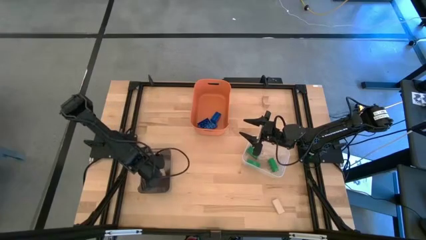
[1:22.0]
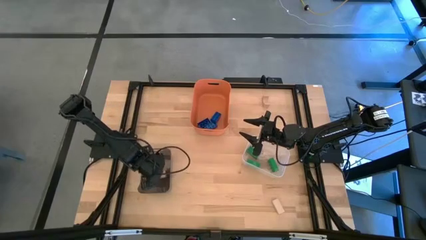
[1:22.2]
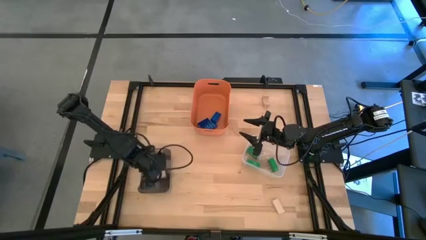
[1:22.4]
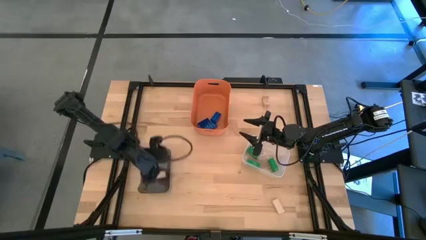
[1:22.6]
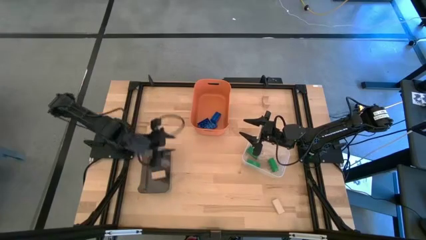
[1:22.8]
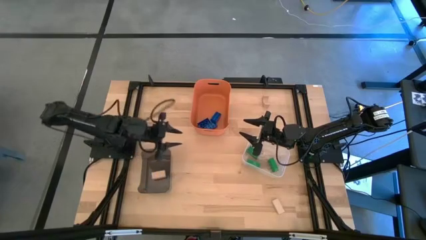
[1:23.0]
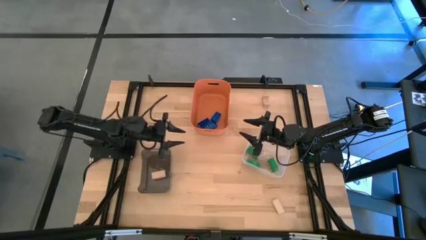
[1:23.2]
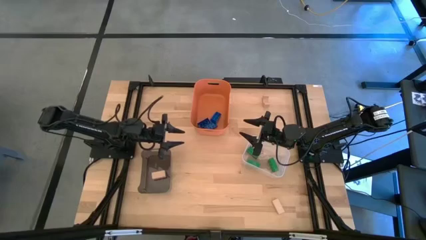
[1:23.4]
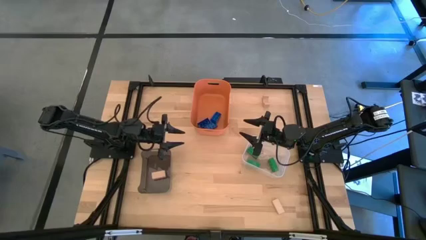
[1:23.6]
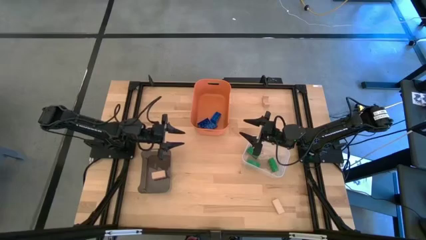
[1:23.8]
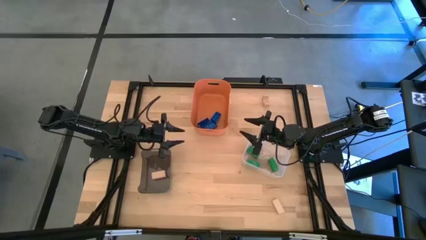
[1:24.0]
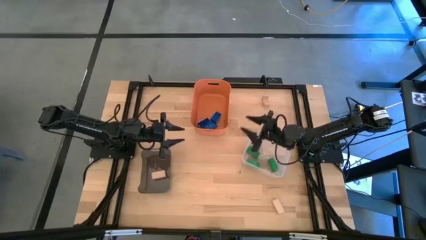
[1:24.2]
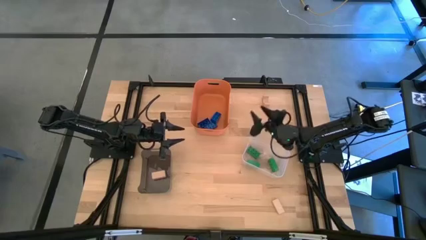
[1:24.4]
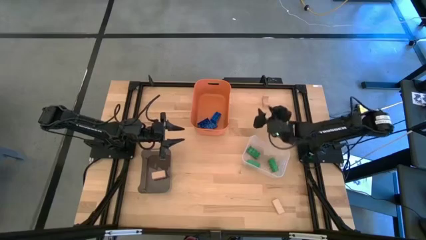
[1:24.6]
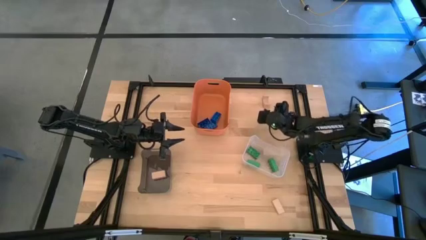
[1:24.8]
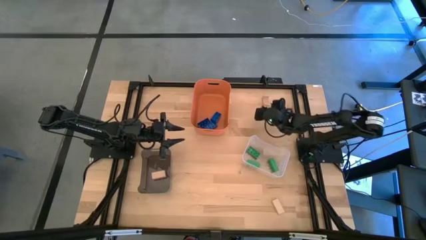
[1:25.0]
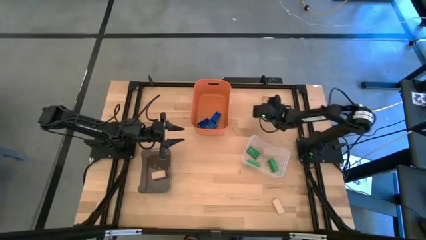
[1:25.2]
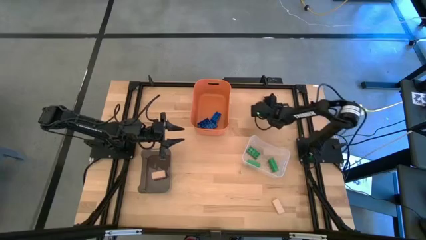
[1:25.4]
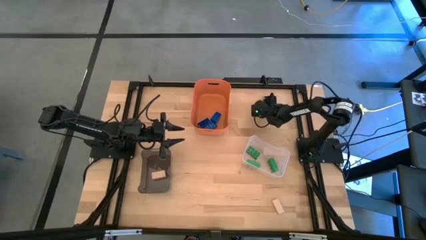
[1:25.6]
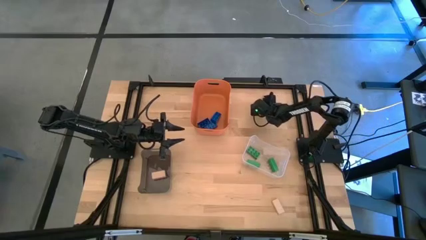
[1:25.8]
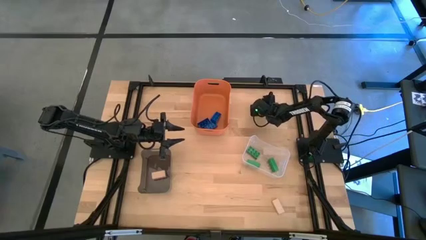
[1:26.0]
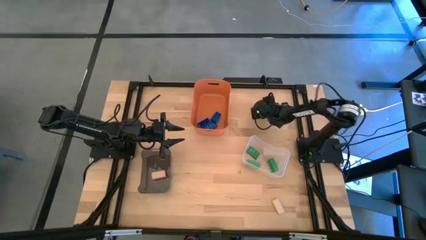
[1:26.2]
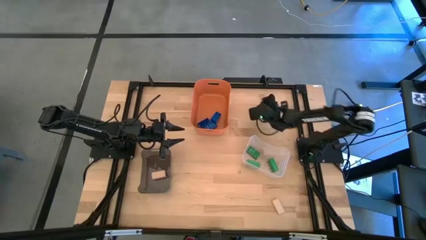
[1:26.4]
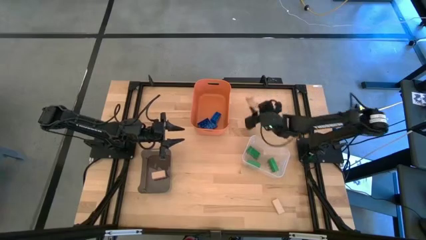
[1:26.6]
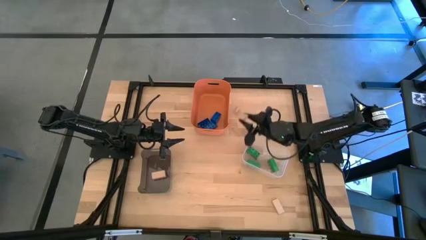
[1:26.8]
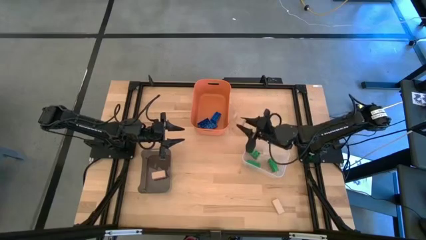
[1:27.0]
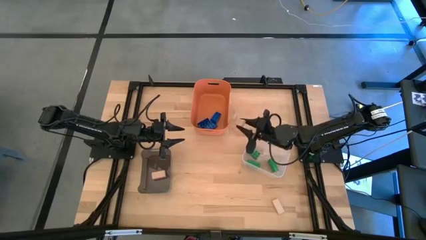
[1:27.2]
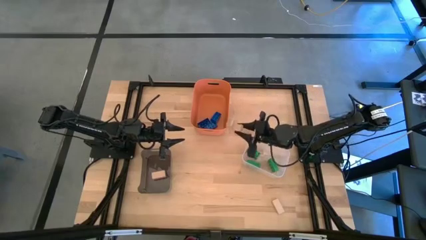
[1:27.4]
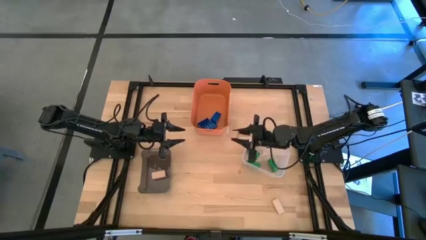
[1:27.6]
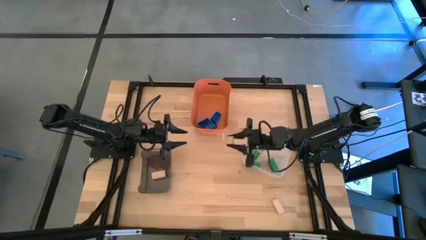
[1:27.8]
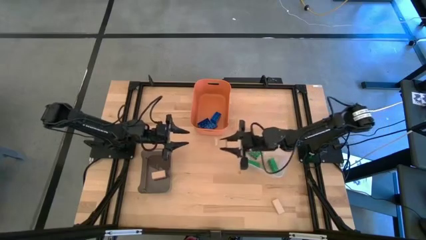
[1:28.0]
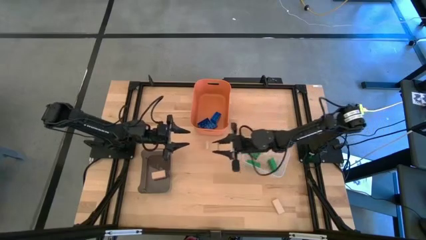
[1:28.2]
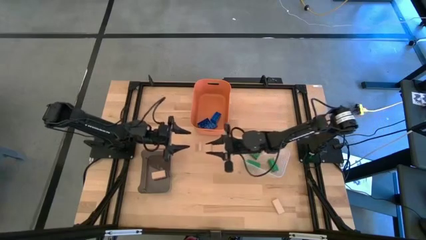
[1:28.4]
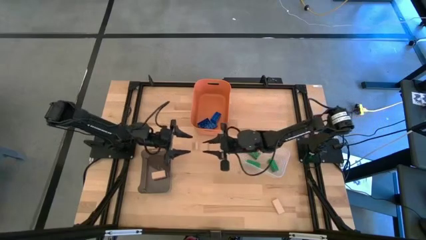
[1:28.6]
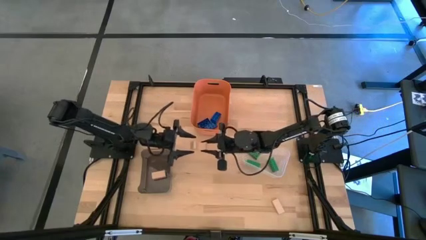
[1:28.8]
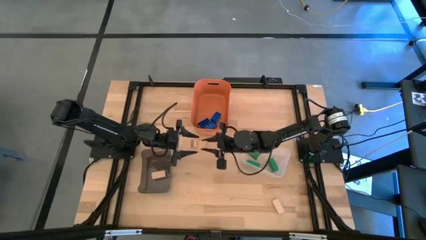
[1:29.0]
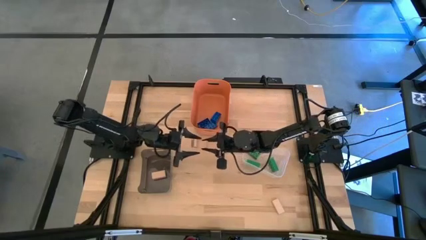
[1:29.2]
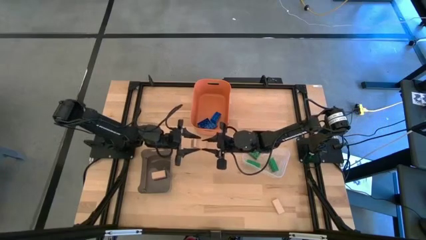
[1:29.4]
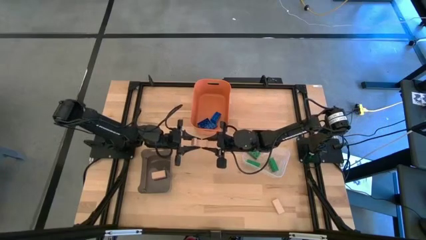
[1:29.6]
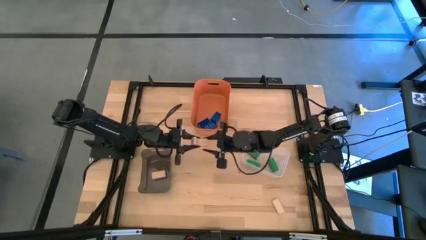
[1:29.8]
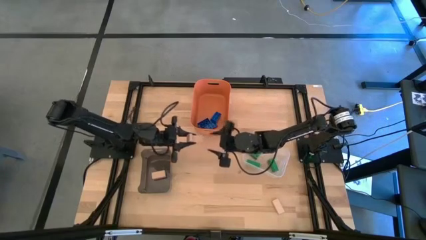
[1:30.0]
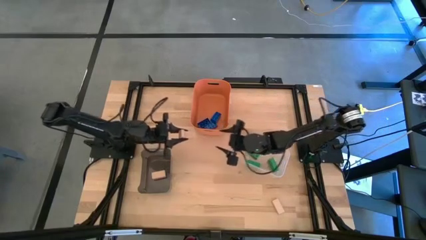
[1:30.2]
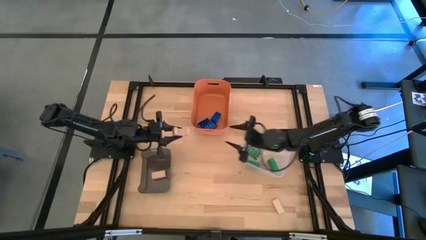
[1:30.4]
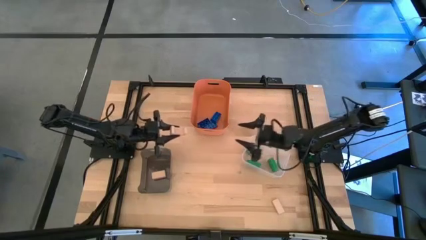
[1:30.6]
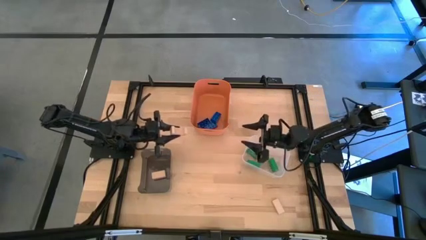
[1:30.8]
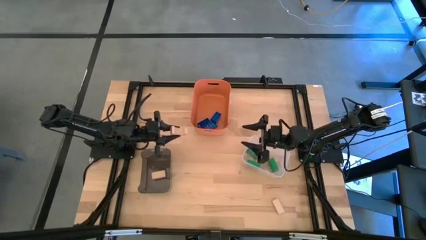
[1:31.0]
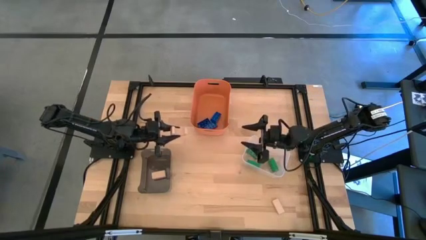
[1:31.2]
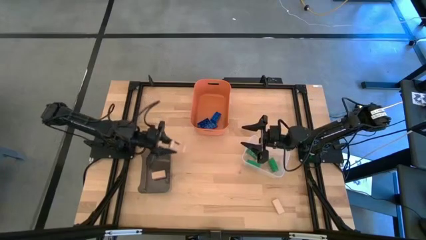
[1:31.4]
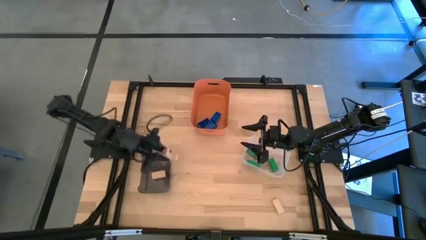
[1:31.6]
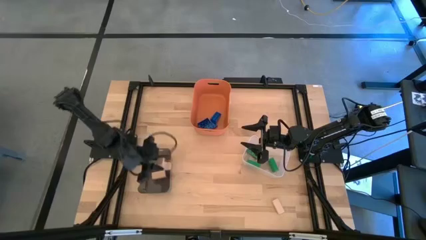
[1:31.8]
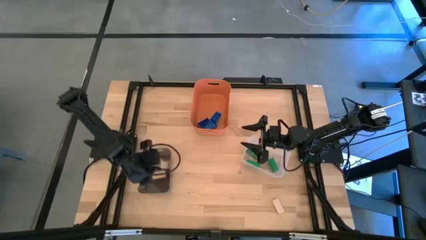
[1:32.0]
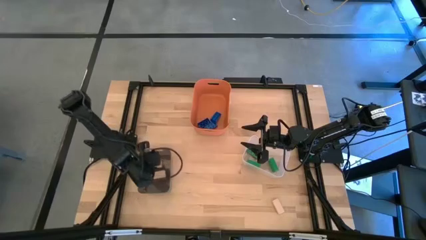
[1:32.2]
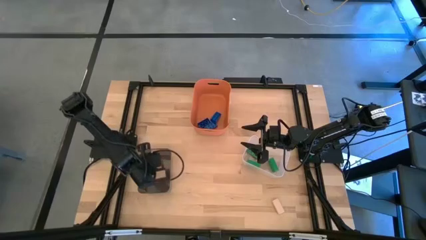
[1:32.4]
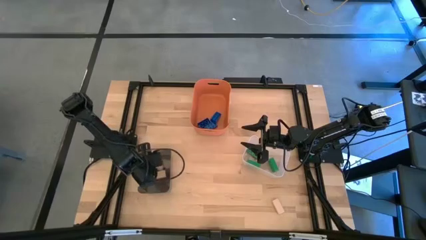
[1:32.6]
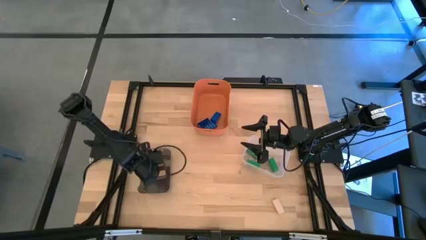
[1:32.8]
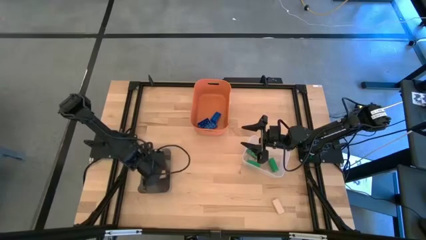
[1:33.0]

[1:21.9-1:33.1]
Task: Sort & place blocks by color
Put the top brown block into the black bin

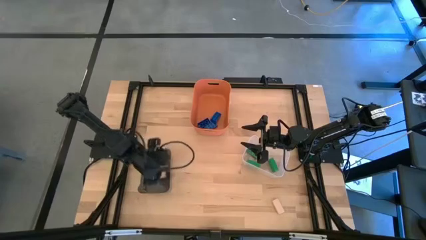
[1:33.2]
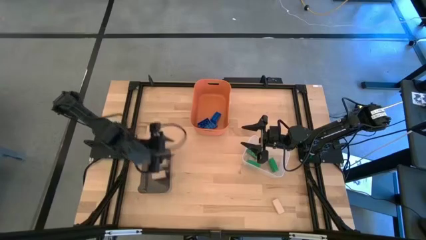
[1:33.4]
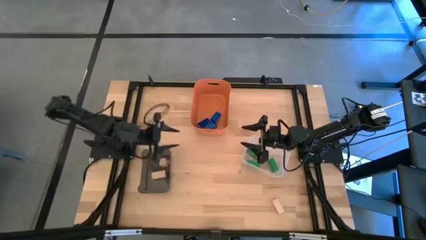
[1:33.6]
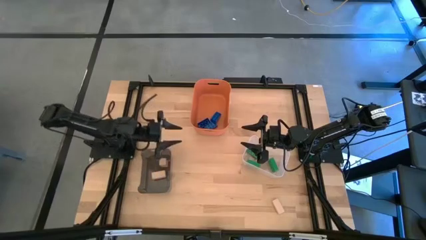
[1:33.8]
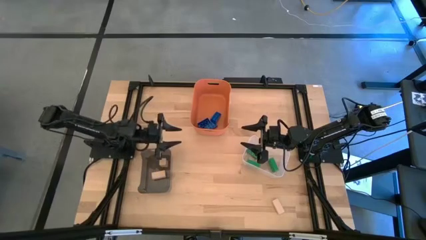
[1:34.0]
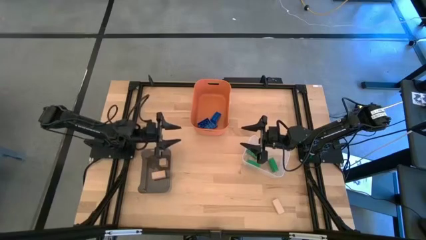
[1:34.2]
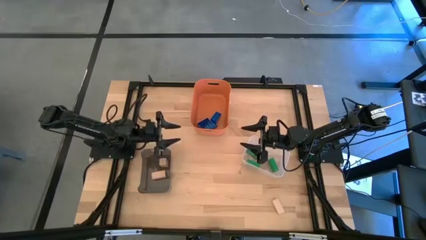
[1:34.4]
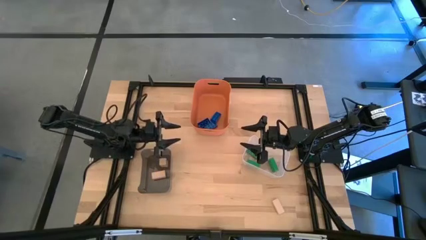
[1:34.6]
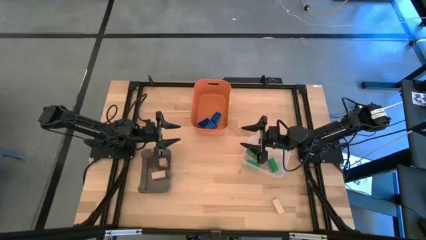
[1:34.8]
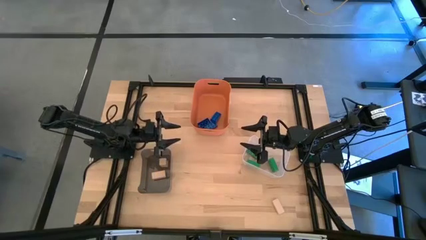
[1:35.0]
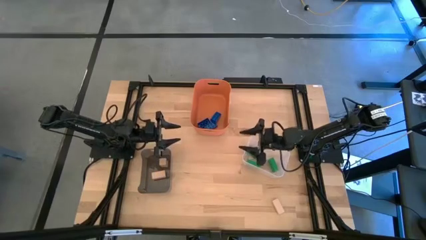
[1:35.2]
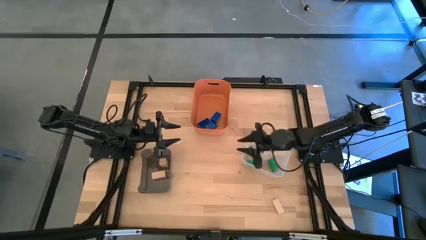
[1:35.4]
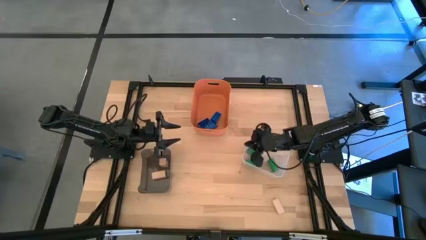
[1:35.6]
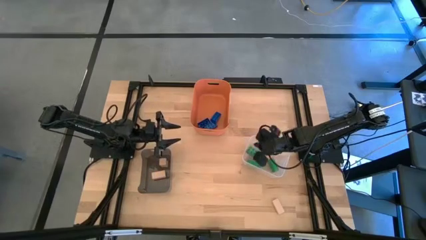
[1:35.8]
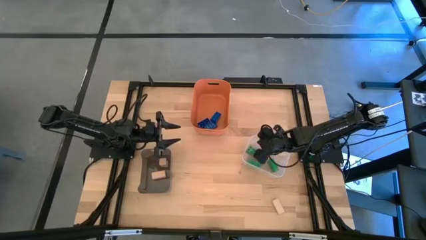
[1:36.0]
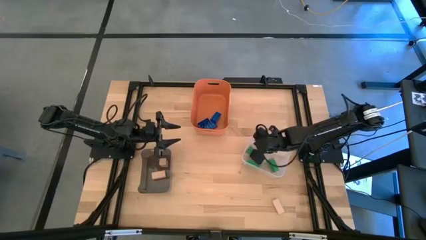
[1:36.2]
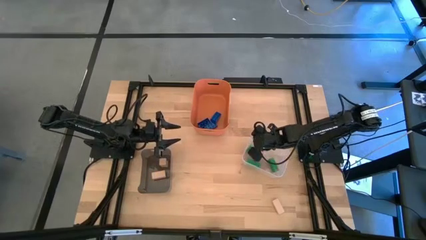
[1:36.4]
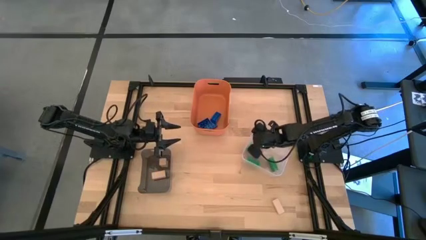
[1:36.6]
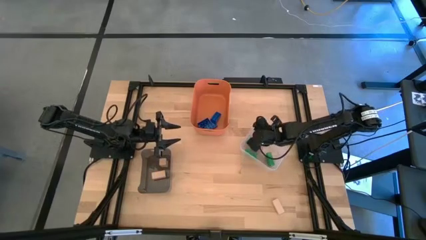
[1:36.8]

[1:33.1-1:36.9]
Adjust the transparent bin on the table
